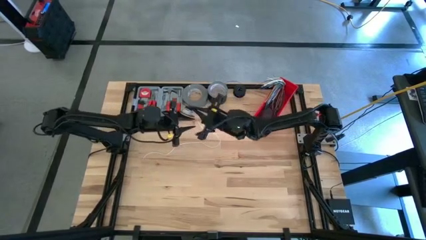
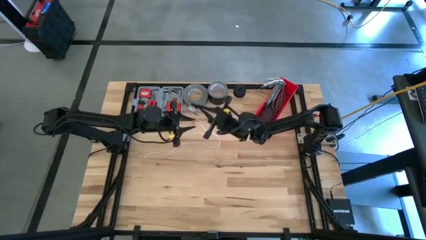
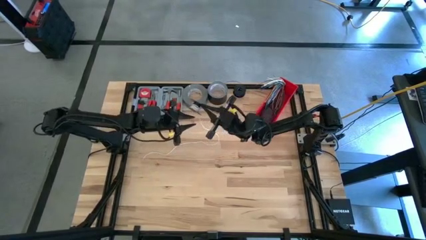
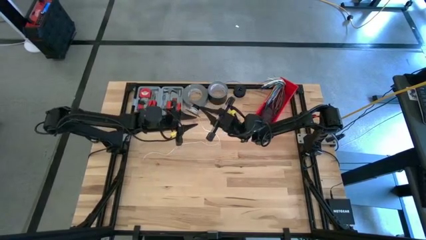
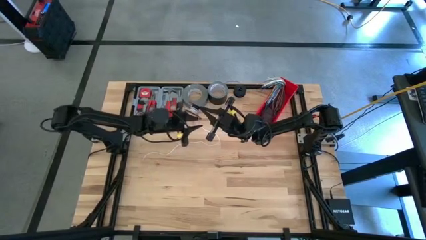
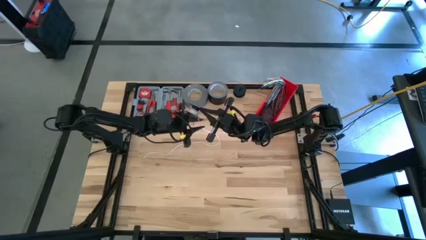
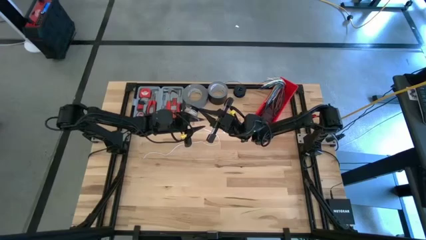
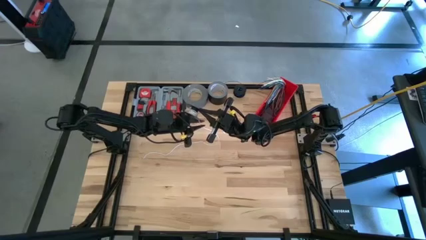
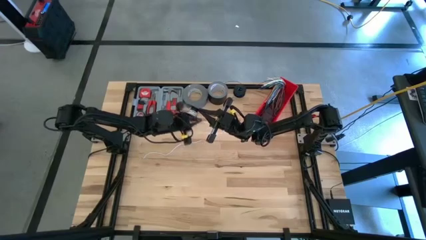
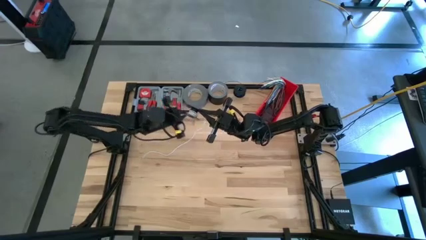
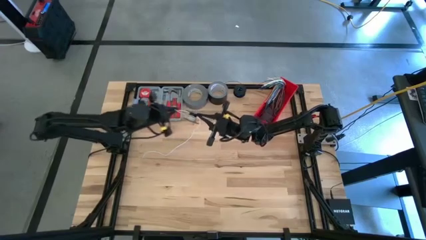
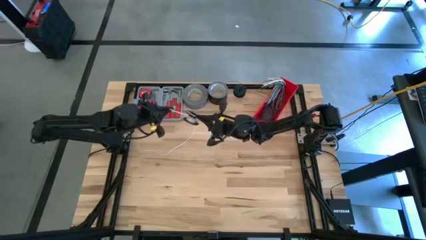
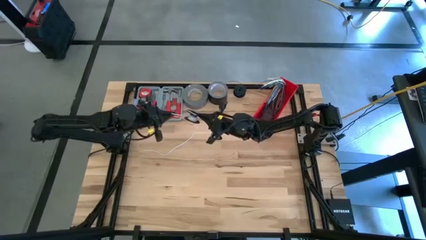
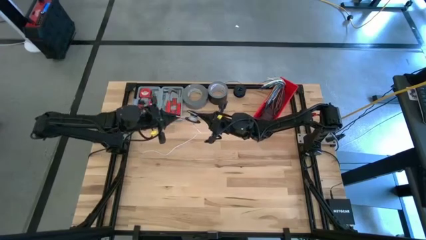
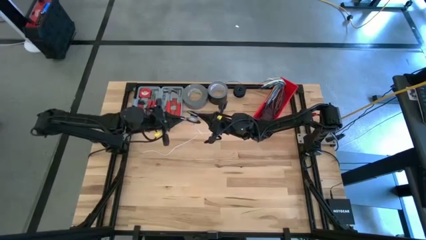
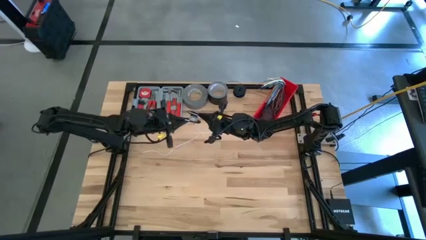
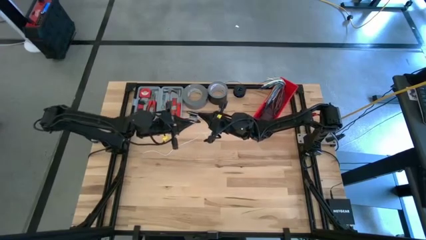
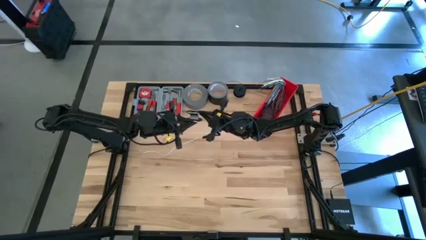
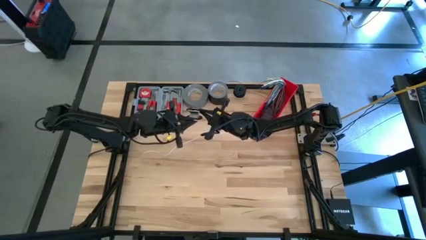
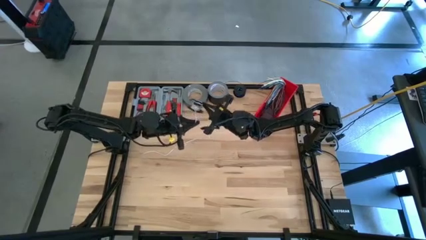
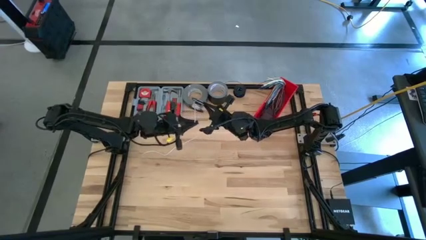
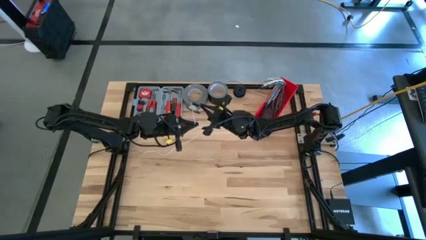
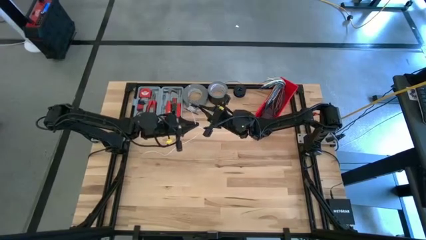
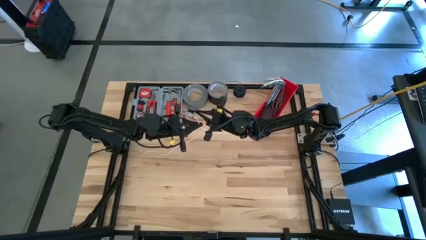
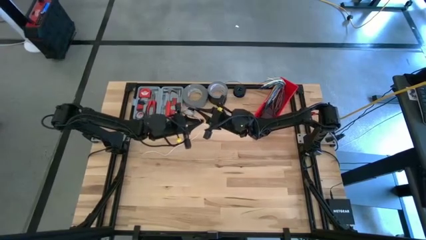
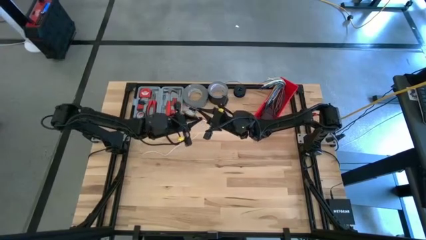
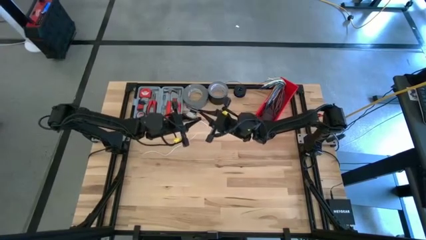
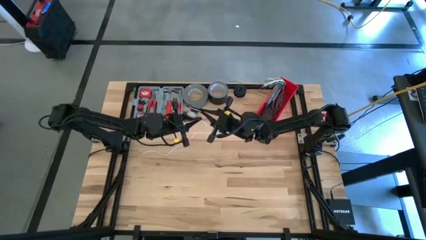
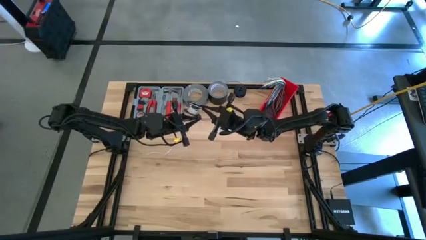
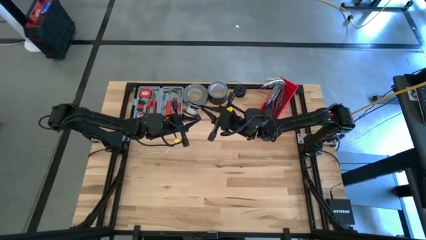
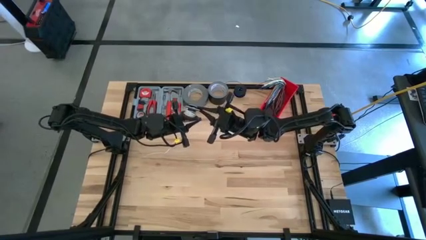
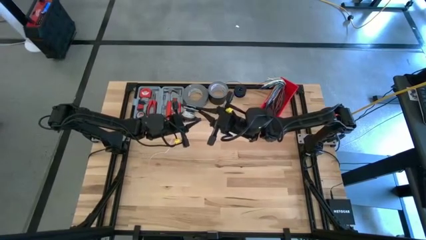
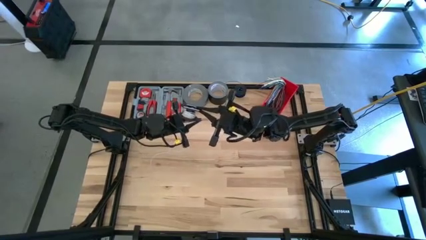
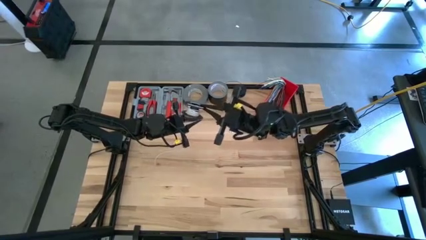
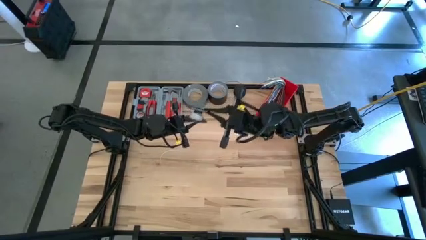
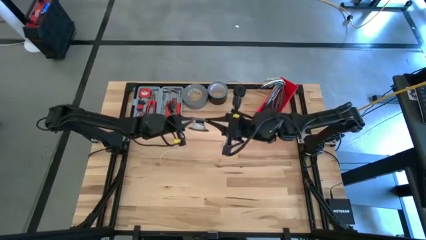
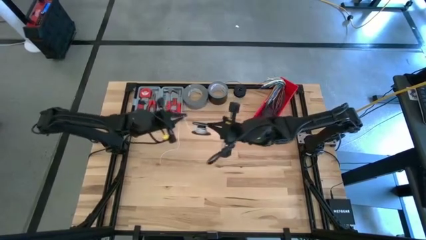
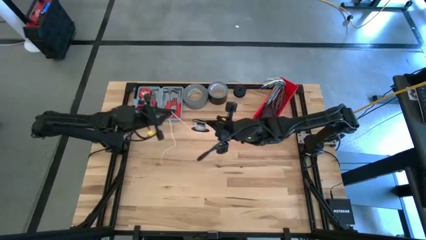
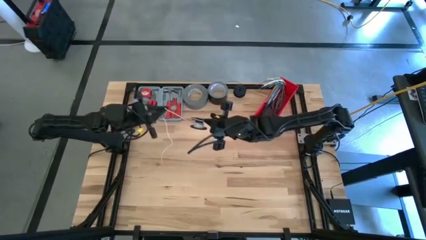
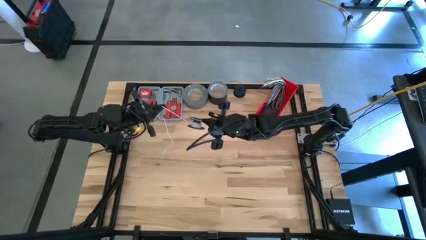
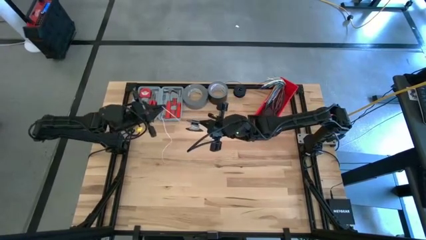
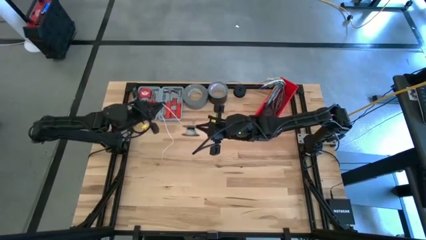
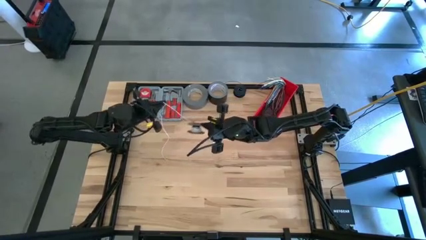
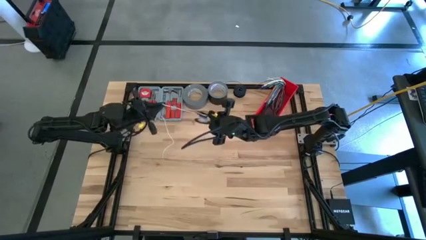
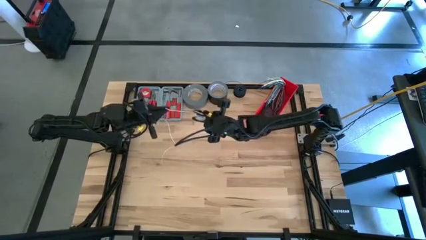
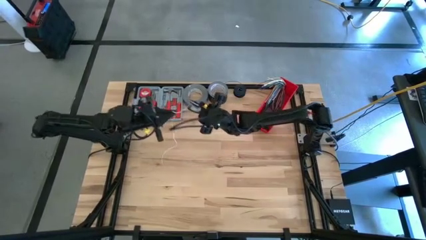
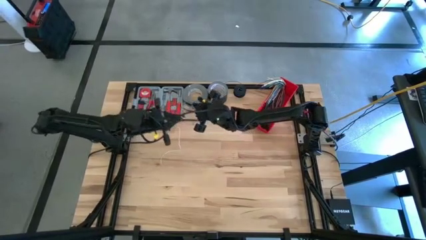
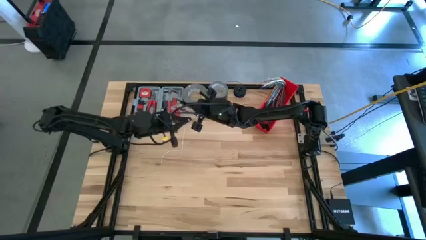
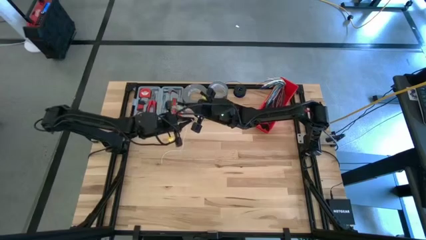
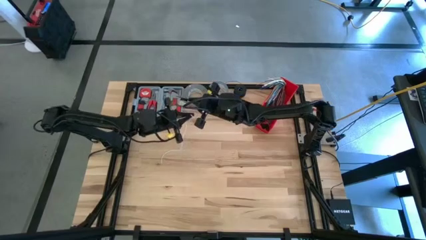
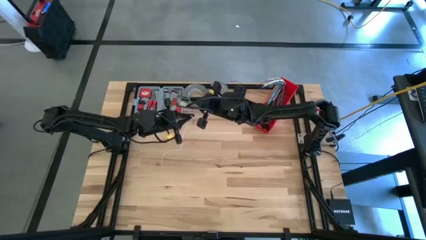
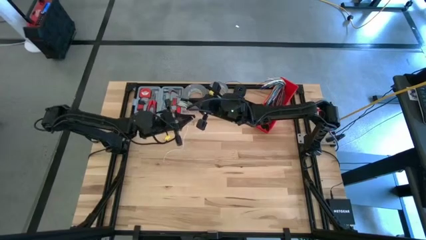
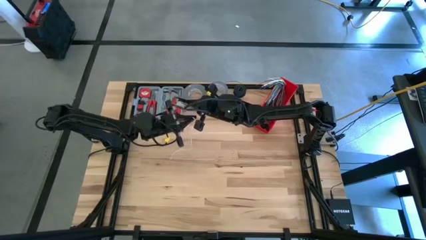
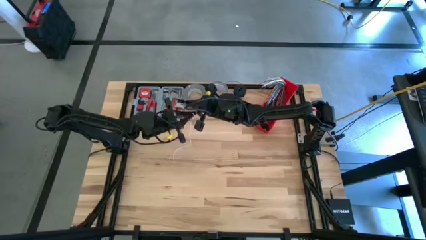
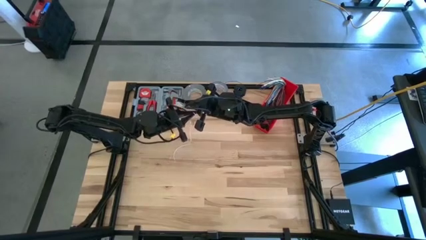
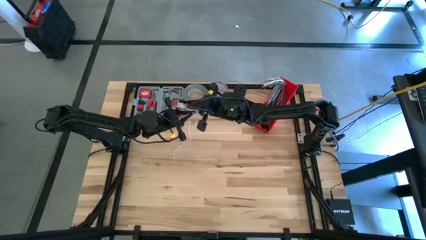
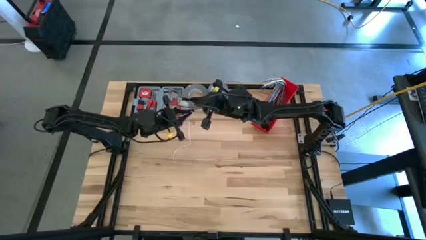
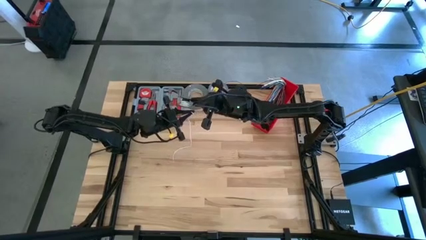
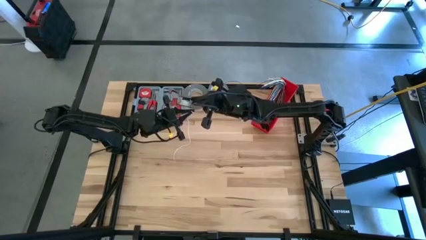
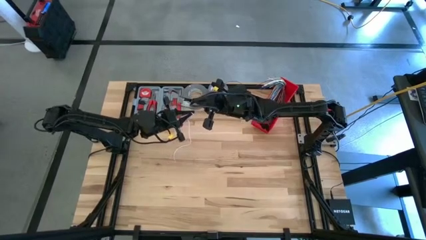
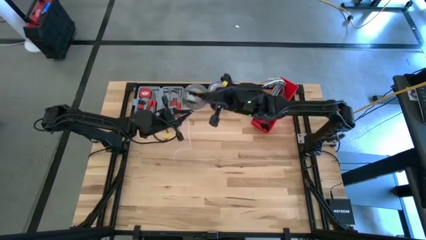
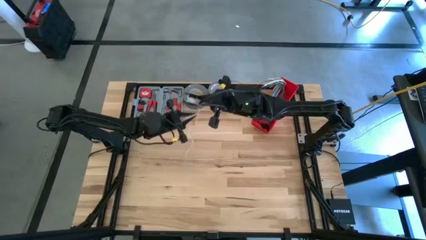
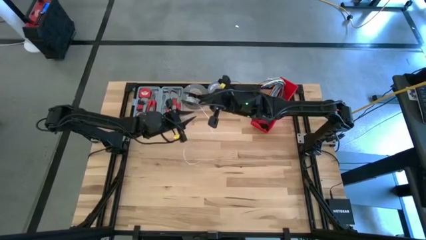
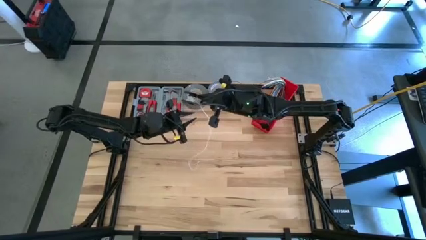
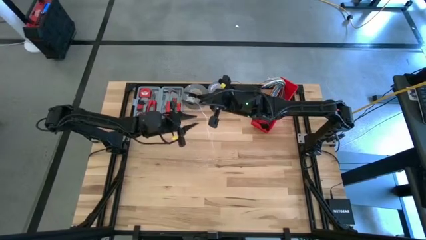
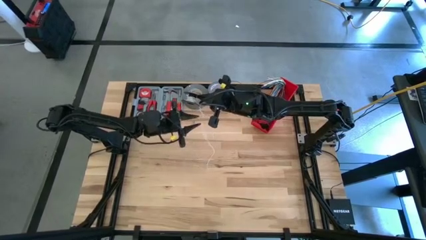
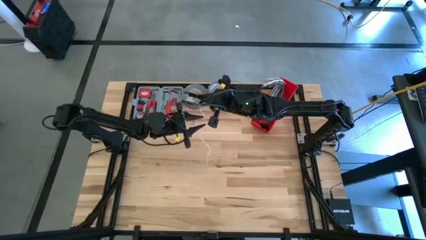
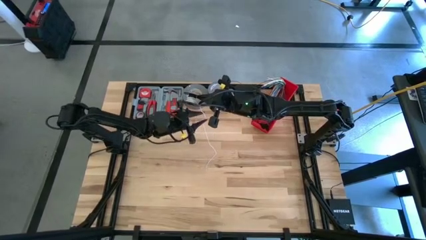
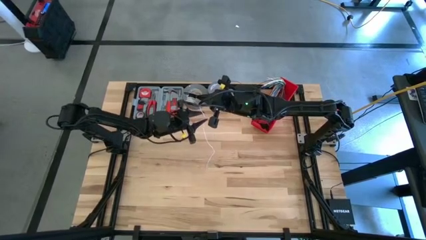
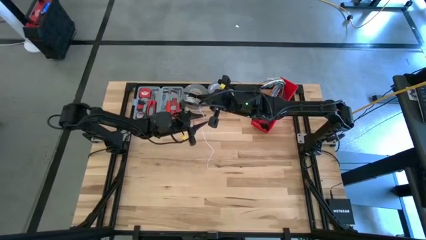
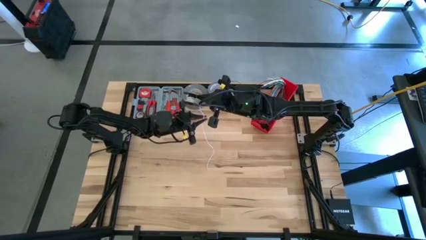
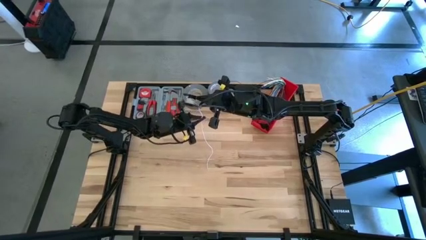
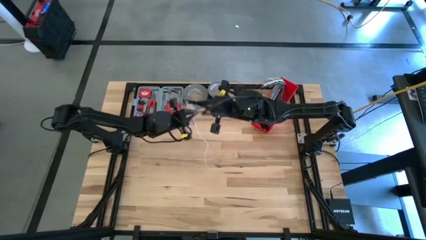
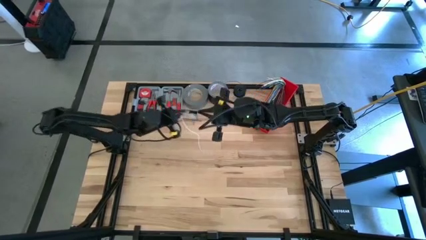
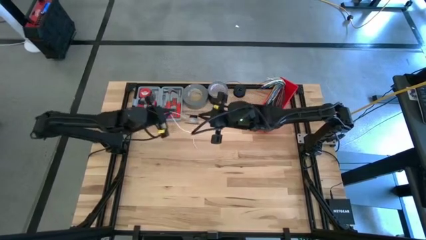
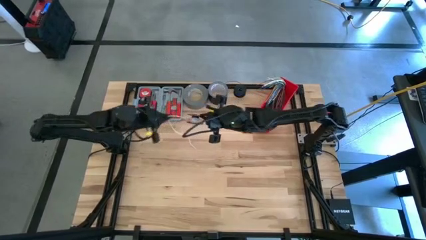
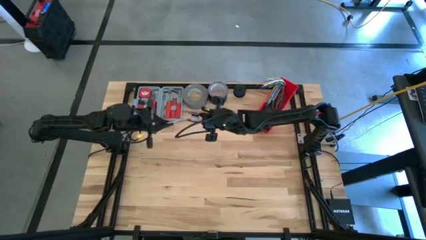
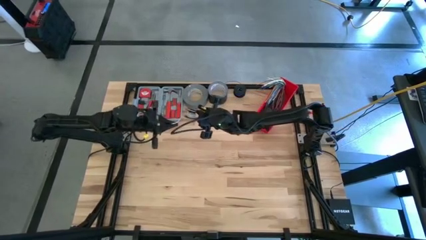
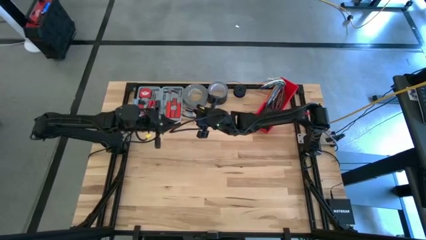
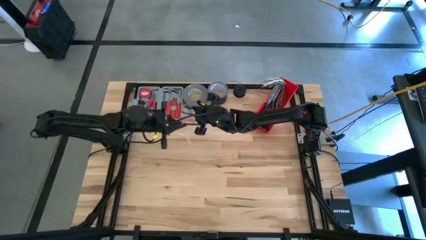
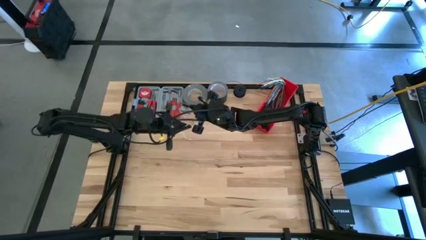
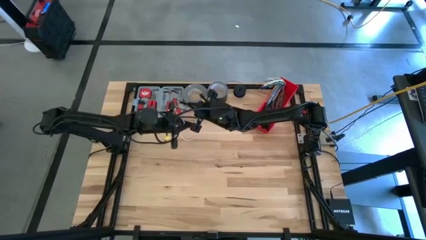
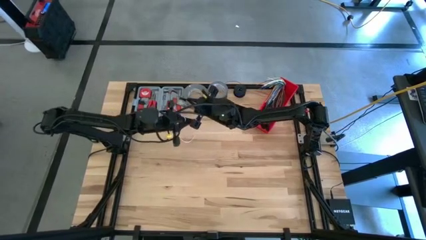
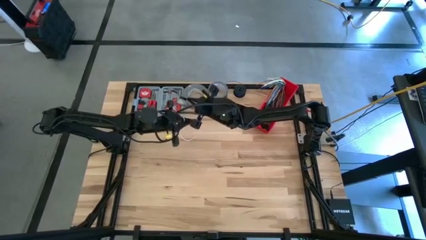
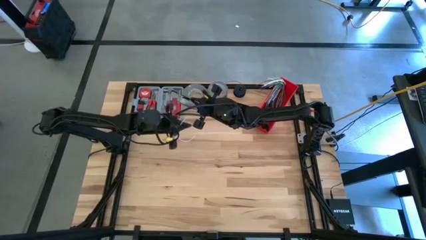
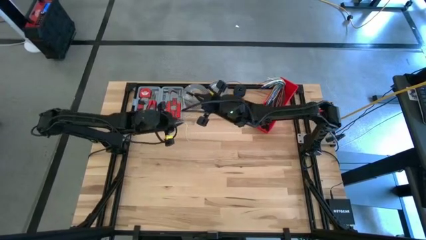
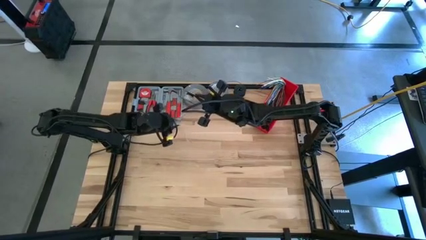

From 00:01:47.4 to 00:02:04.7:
Task: Coil cords
Coil the white wire onto the black spool
